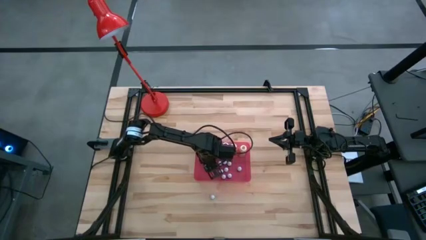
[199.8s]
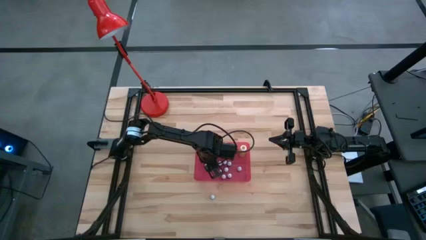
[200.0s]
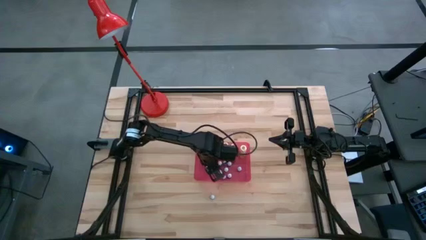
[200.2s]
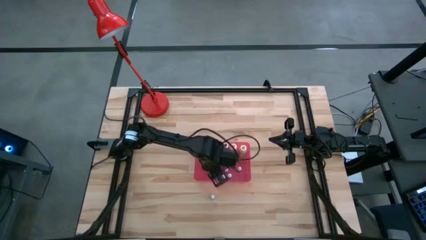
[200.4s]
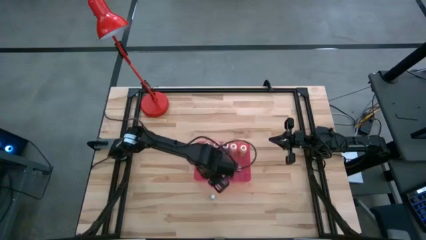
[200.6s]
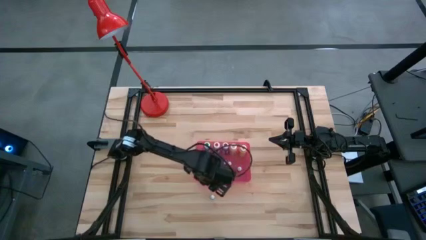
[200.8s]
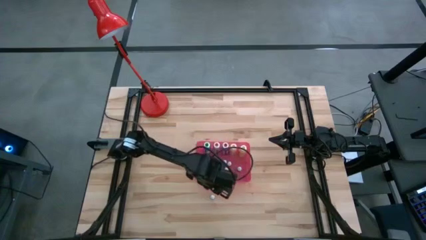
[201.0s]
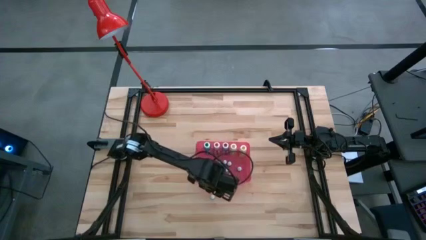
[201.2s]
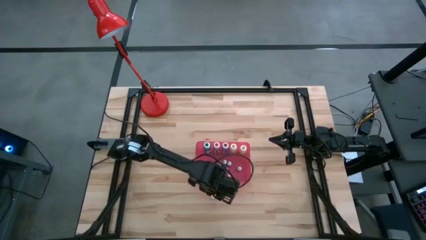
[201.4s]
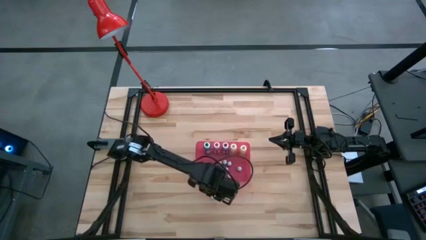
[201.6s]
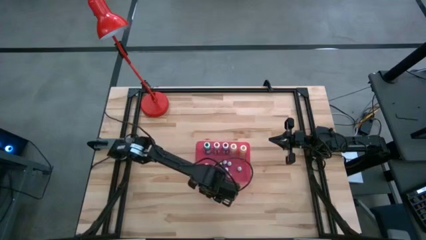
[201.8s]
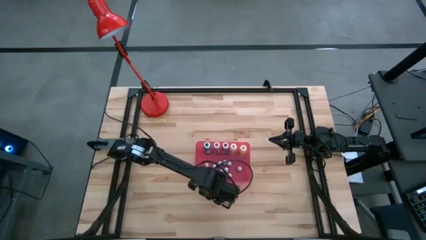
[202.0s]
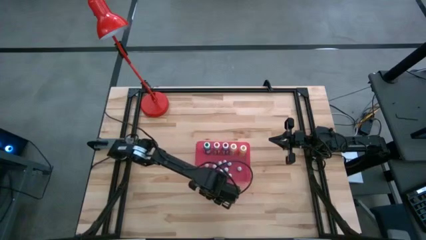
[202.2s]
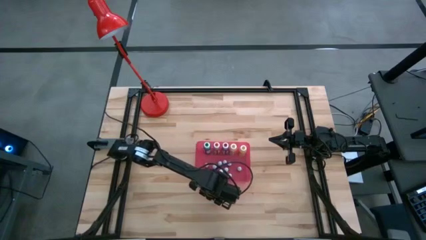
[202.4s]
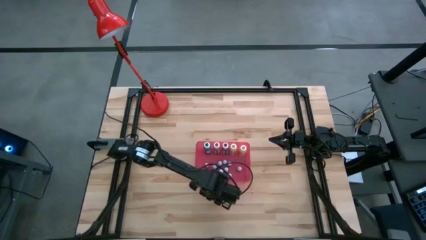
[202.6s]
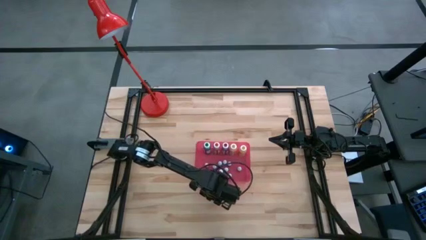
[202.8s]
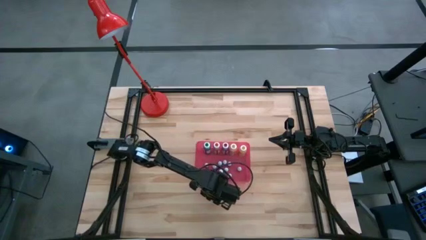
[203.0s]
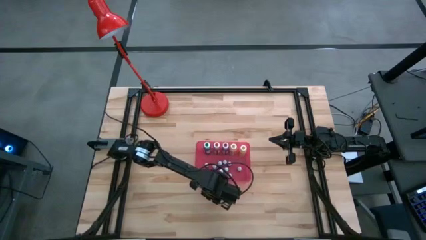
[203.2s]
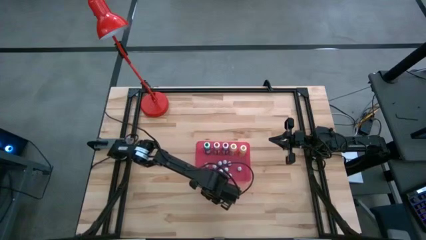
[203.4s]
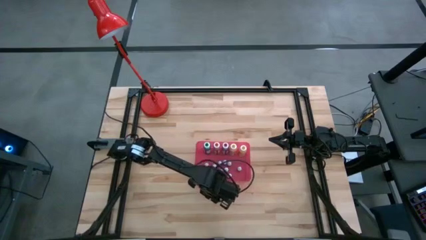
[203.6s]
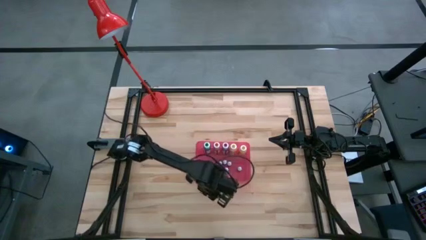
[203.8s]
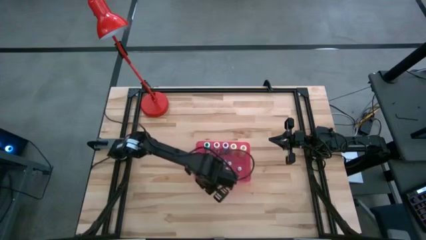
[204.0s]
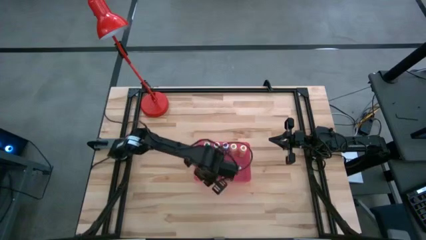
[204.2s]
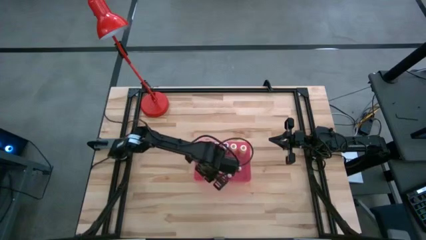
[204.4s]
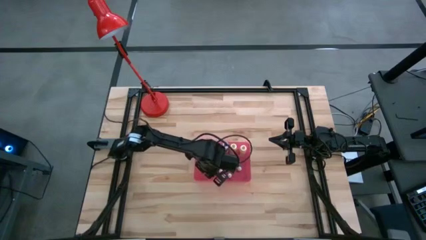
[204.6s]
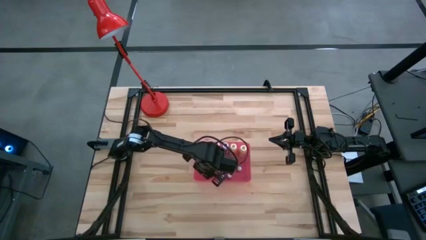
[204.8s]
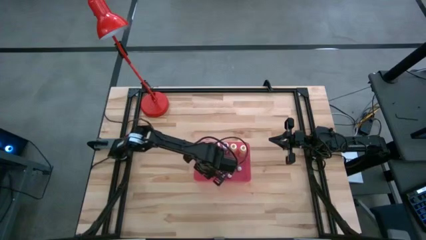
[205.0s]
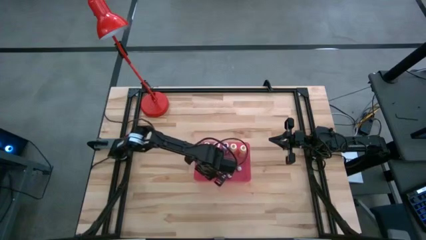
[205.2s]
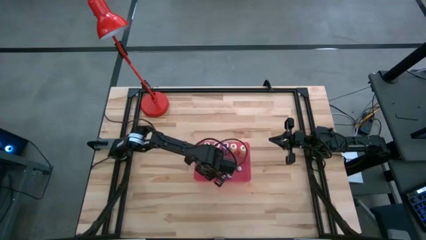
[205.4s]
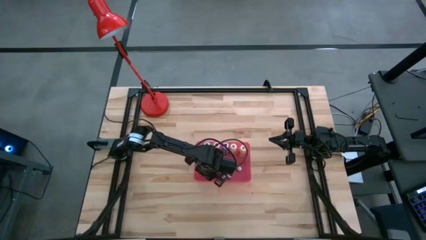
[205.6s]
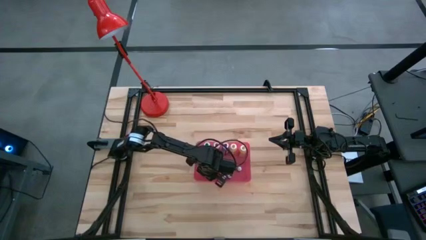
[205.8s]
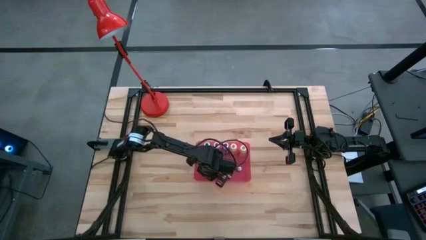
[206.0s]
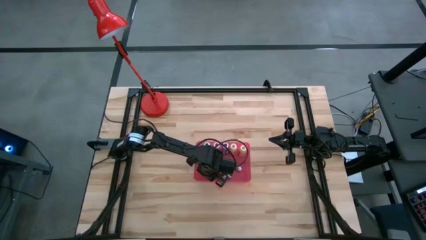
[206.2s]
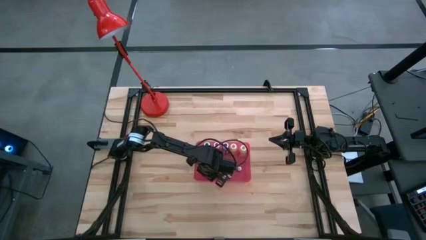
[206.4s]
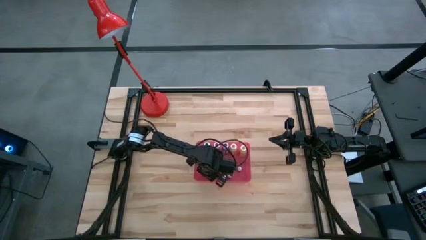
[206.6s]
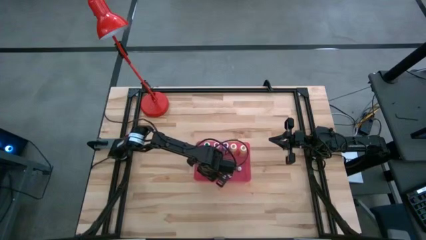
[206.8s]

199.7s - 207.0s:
Task: Pick & Place food coloring
Put the small purple food coloring bottle into the container

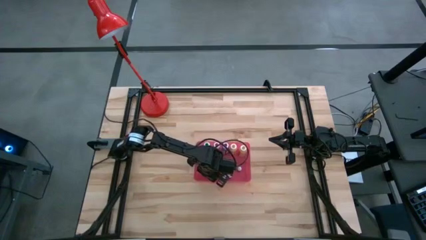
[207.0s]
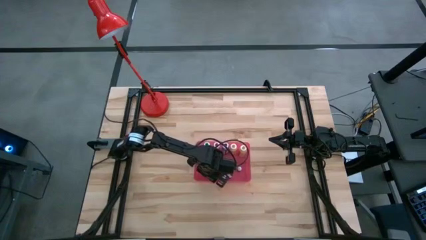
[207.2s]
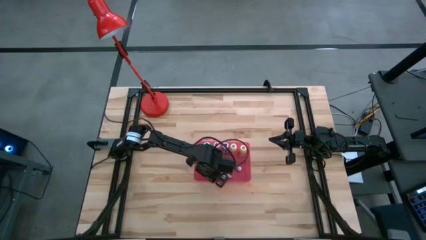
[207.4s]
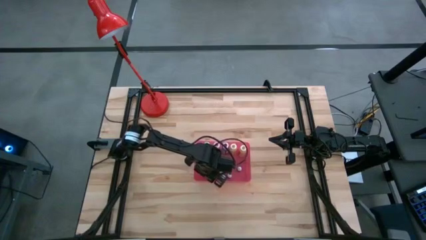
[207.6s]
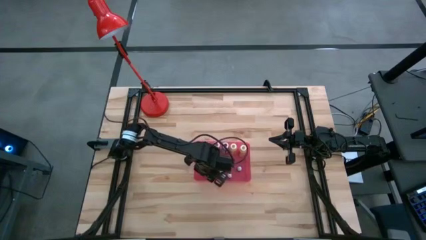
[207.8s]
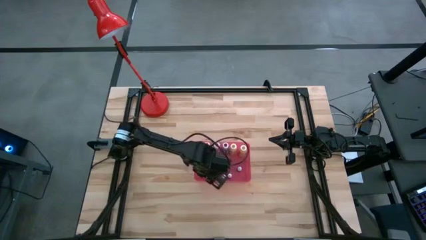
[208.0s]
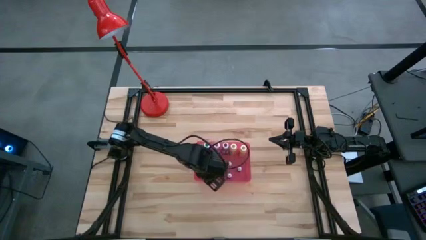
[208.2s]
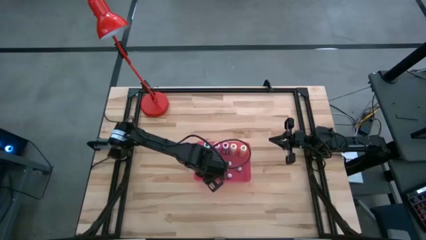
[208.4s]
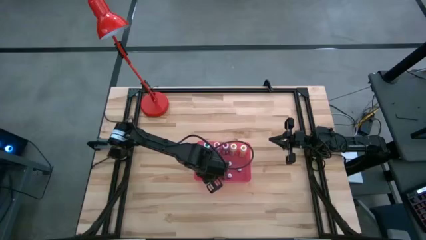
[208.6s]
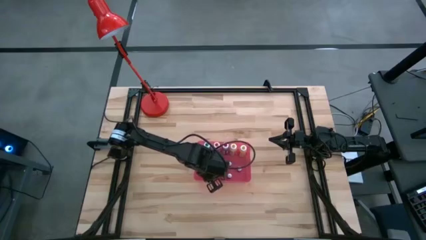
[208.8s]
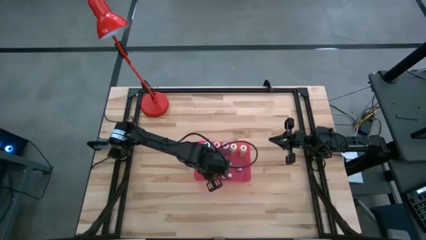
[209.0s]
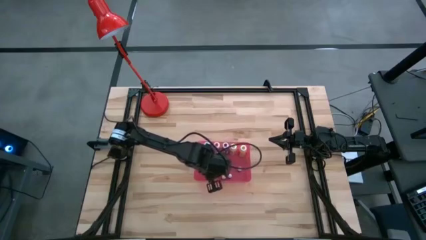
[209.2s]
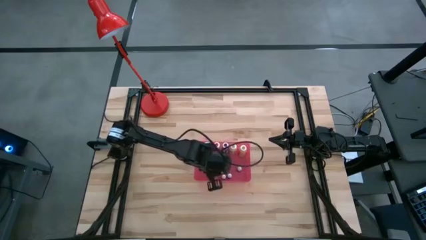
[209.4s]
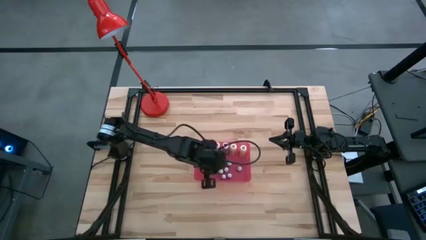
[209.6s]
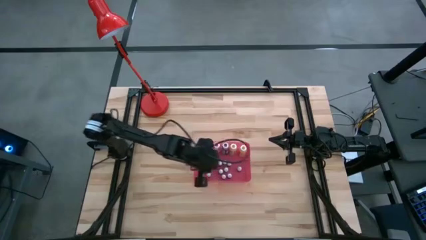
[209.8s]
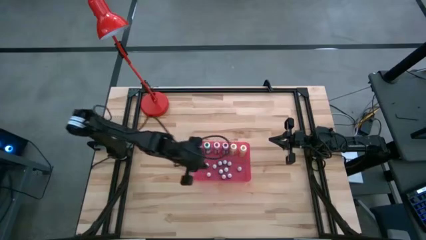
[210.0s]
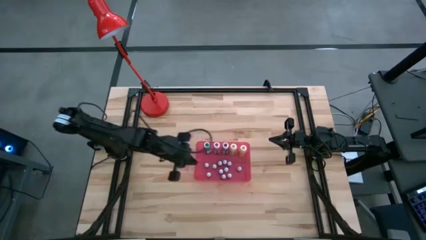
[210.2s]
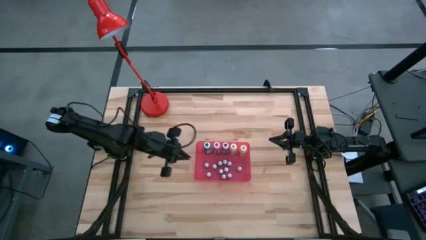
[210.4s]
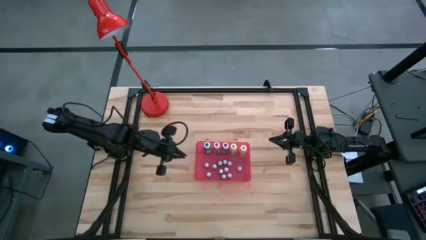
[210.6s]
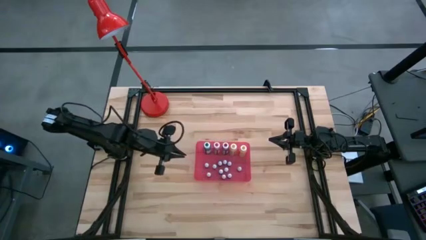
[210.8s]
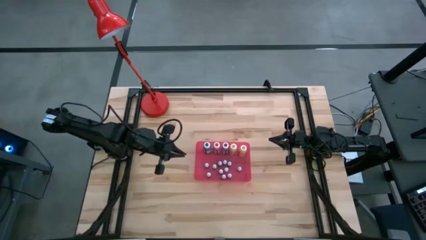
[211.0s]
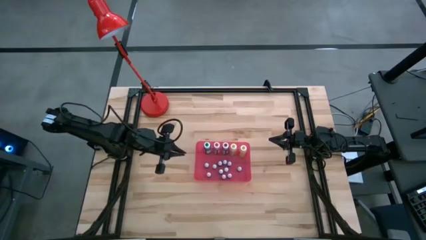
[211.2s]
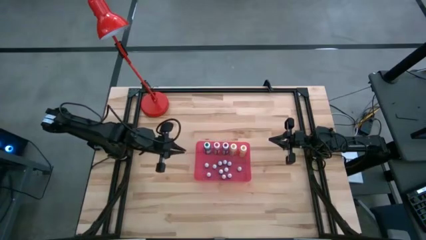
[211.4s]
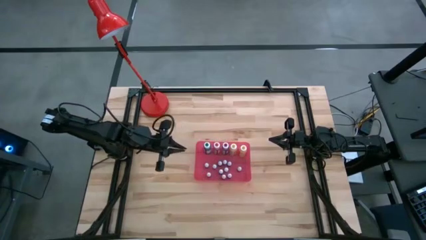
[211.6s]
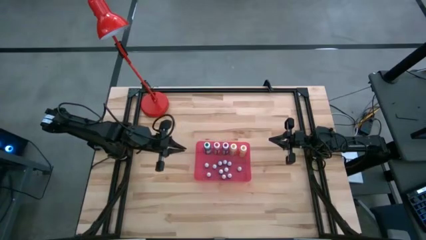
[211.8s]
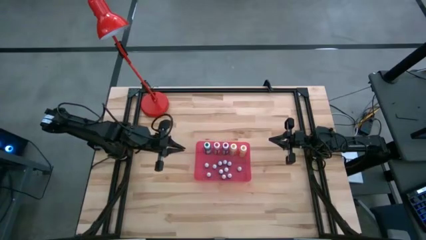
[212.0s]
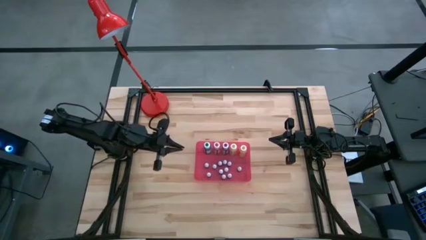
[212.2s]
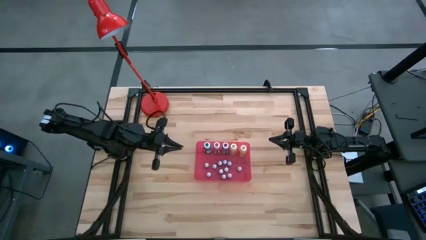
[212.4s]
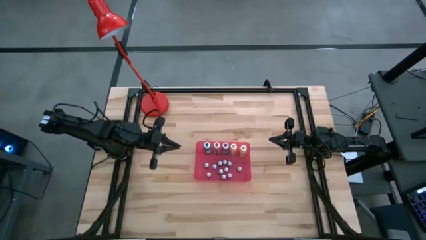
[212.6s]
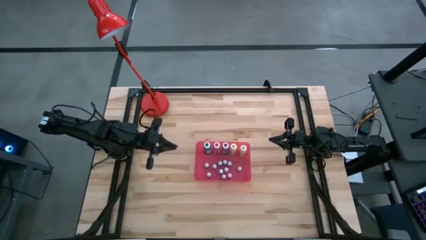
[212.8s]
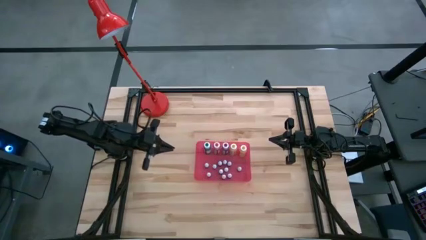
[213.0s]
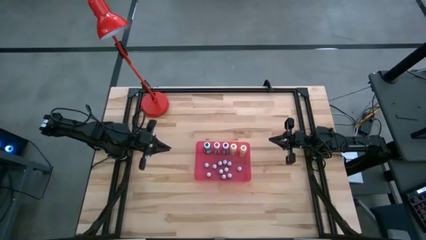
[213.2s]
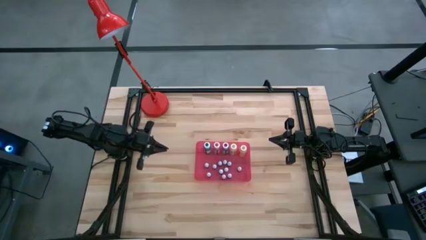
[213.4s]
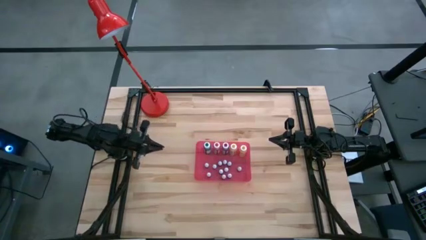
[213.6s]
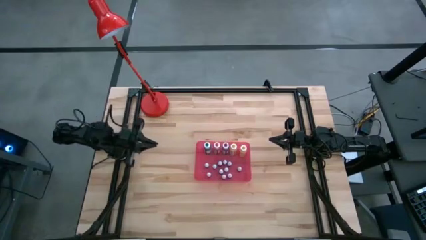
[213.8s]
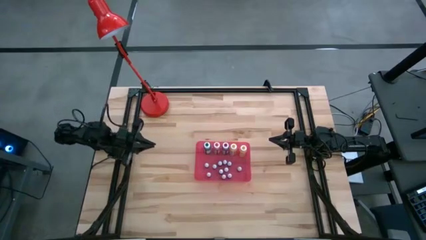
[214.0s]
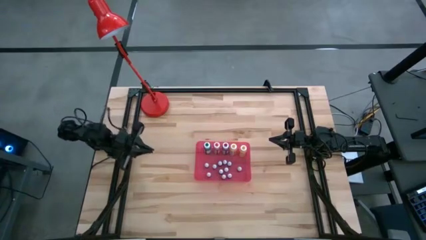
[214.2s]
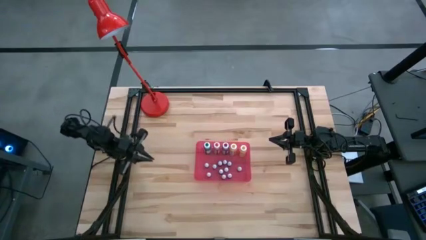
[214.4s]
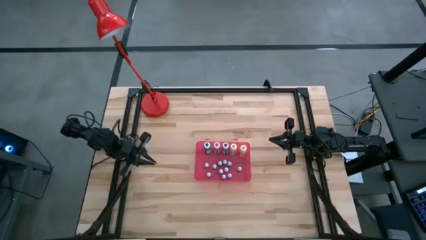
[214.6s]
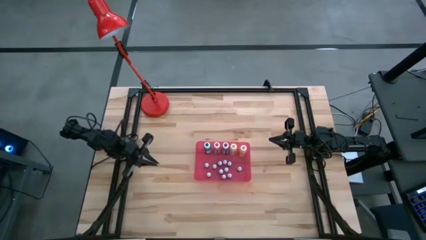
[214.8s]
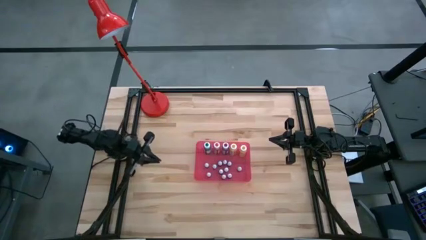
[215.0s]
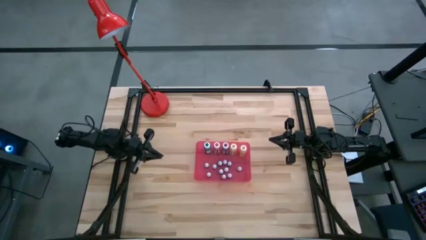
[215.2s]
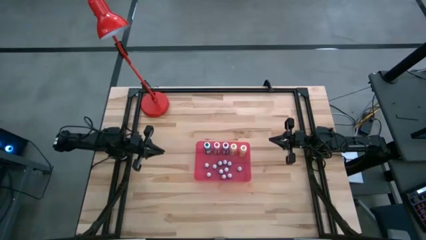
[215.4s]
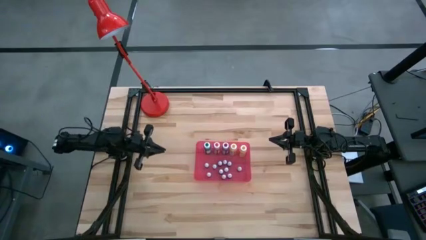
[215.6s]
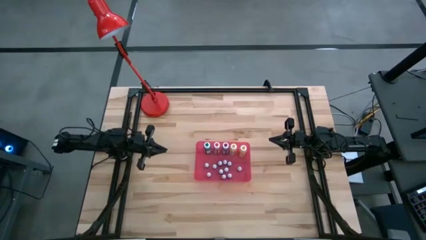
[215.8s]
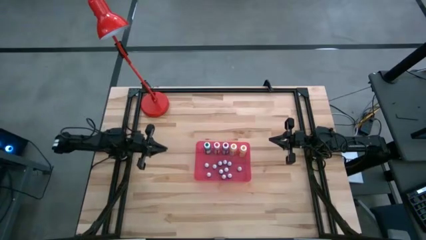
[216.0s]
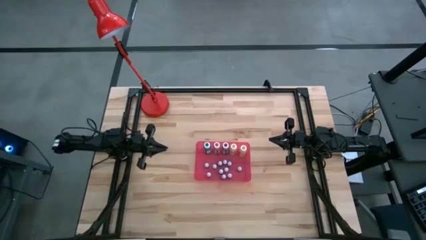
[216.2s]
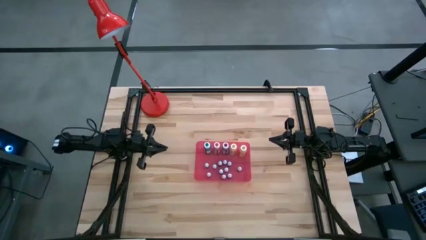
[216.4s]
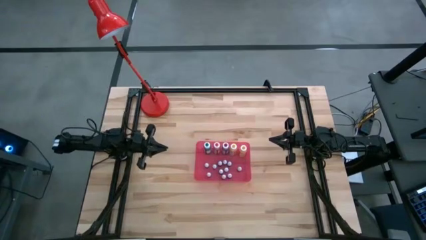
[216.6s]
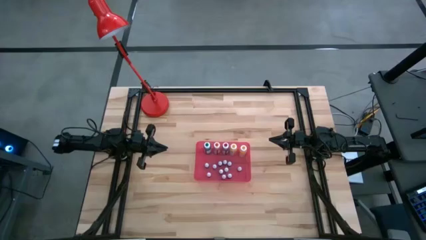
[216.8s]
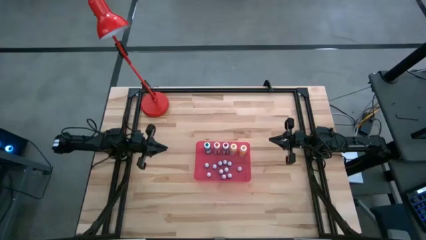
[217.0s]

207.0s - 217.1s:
Return to Home Position
